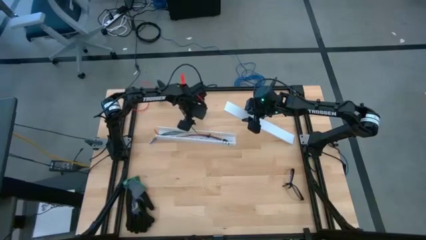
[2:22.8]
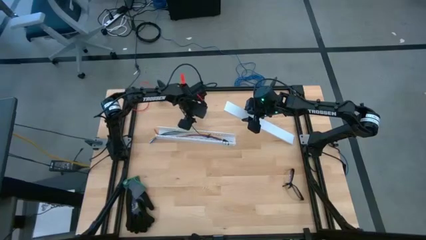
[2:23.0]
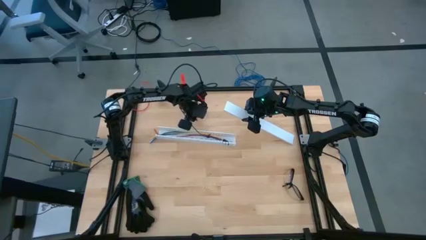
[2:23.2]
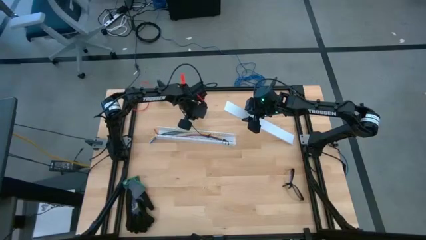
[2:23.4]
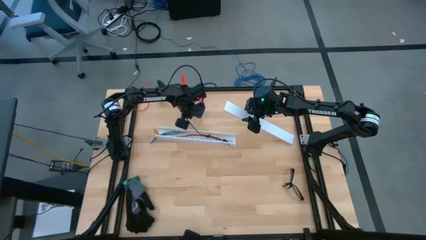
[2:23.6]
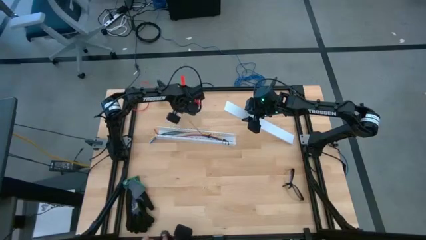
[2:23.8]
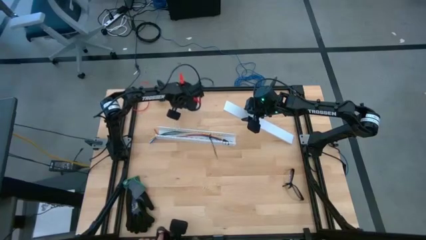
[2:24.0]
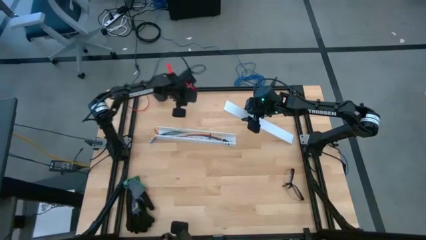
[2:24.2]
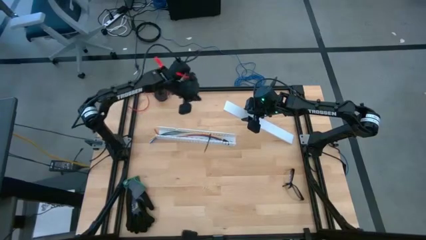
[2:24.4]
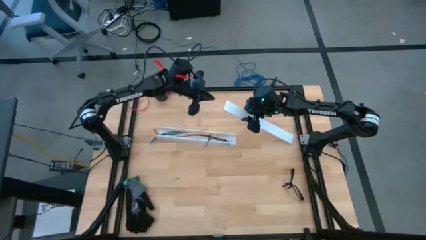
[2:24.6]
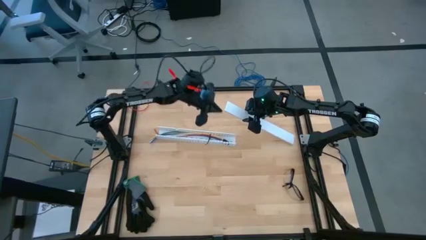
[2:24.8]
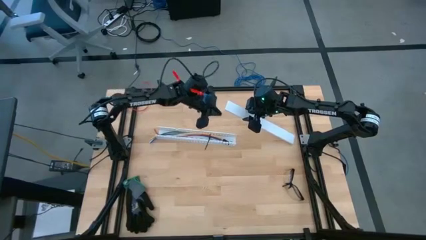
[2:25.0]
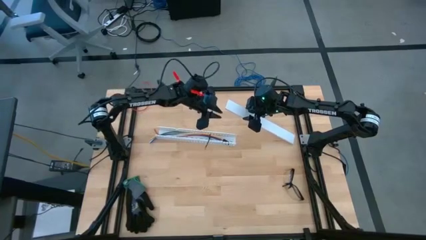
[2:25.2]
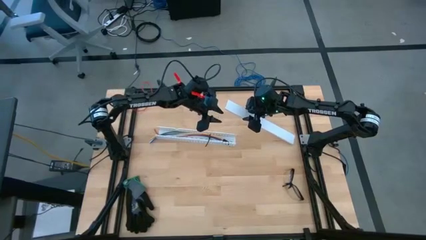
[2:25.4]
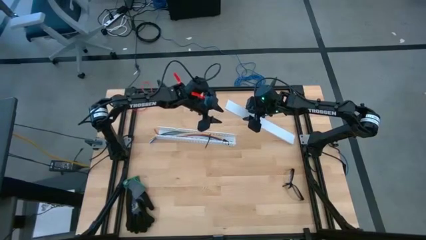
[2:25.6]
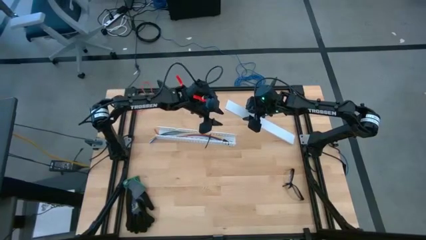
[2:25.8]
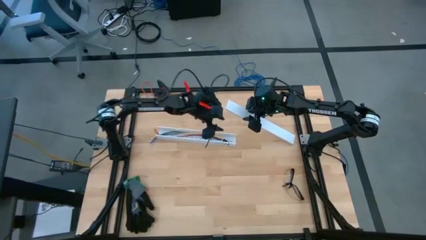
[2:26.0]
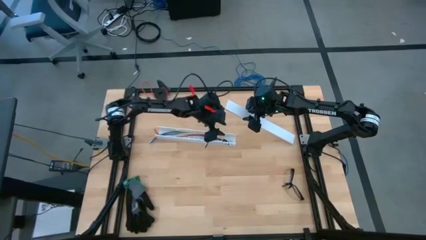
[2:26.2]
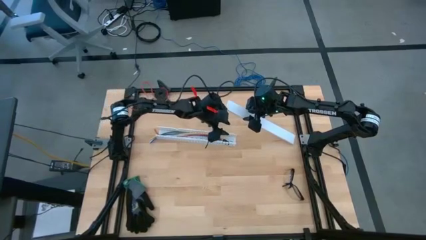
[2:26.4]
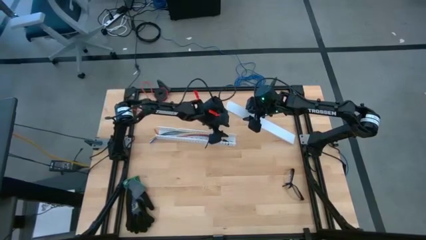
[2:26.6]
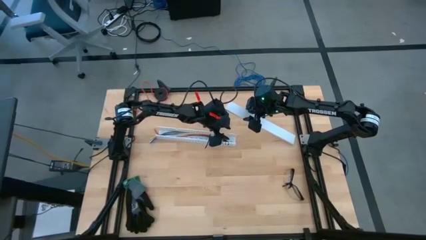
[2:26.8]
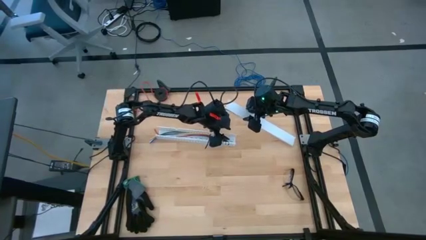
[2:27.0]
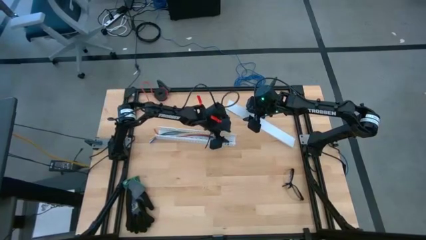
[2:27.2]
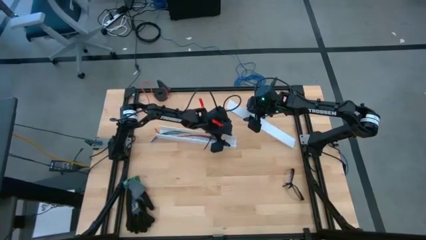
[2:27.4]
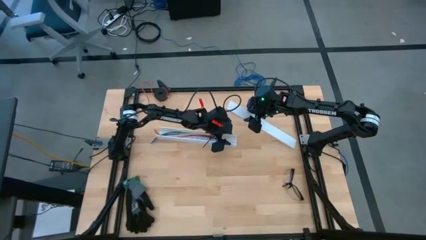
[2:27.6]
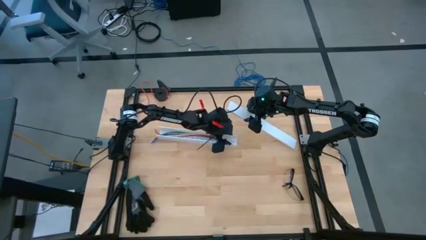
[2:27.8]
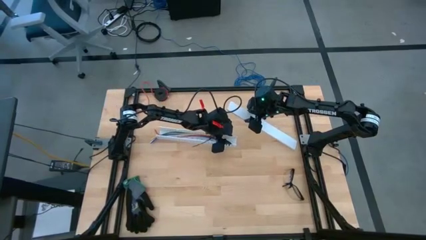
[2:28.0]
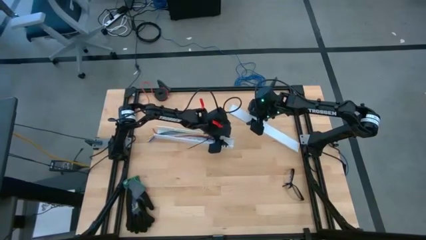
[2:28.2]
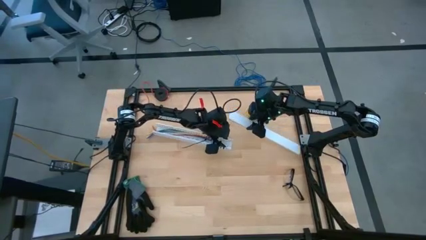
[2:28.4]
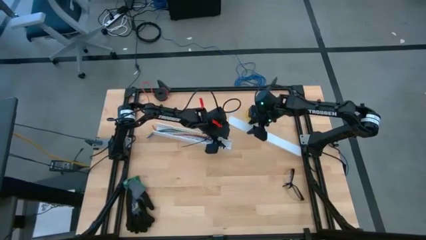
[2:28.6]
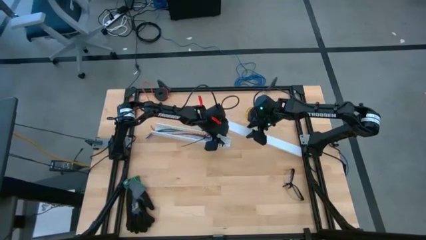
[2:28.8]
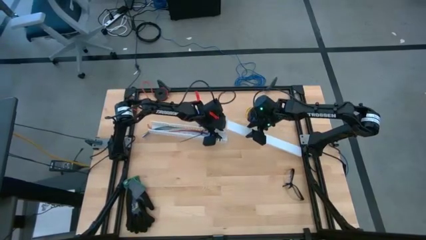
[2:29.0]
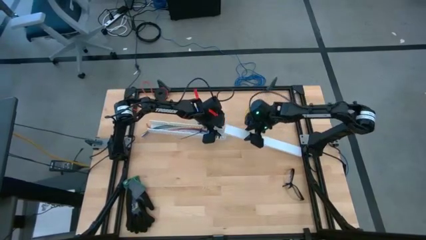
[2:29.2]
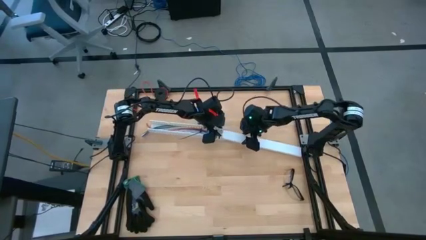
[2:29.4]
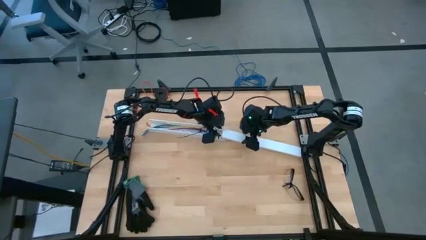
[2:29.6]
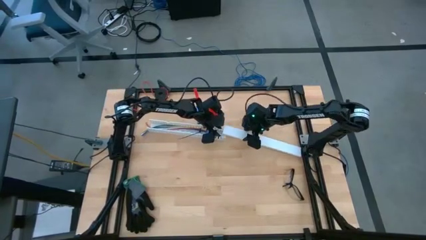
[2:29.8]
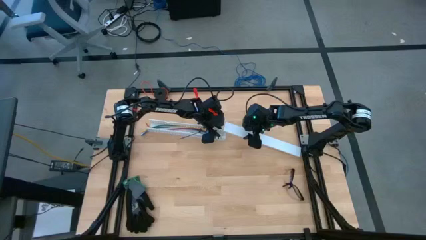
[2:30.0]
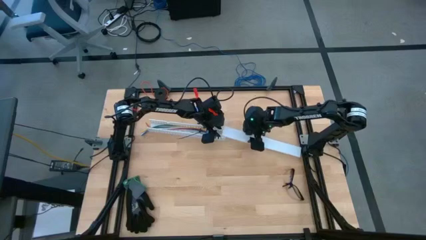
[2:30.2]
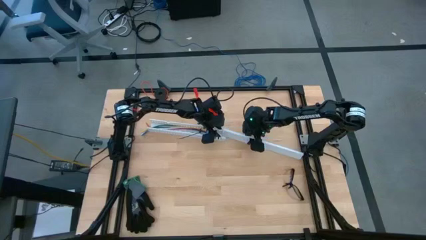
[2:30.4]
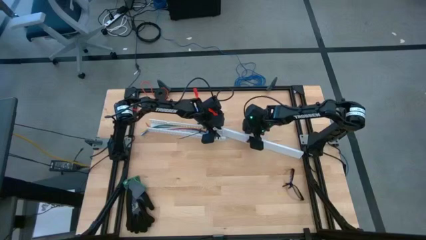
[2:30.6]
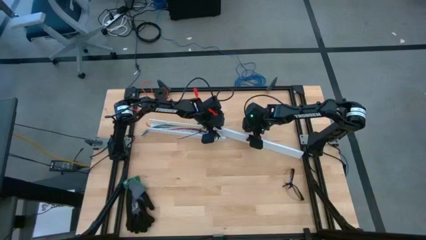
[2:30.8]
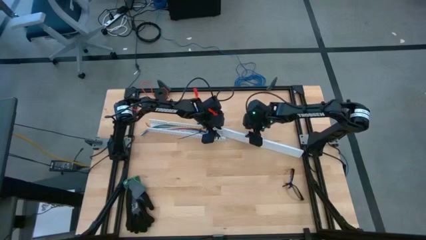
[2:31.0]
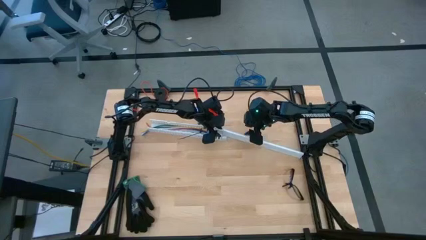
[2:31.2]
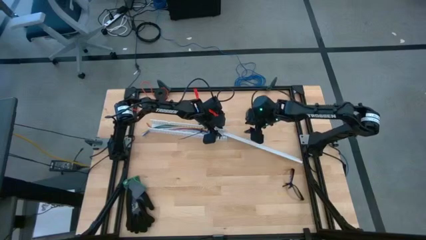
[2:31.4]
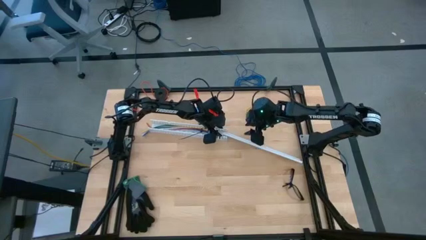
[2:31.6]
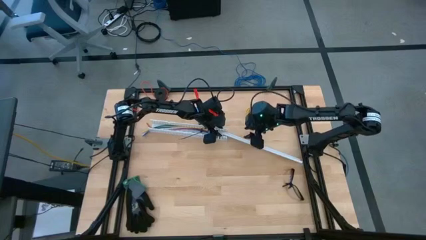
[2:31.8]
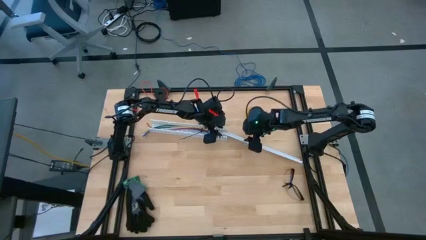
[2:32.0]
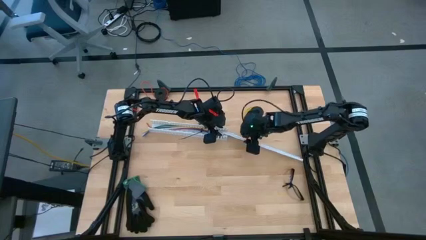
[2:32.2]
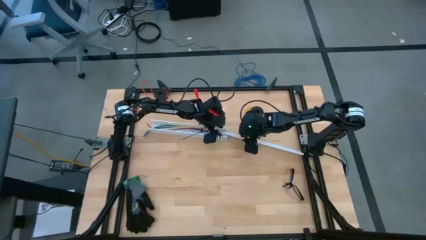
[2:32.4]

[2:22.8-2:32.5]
Task: Ziptie cables
Close the white cable duct

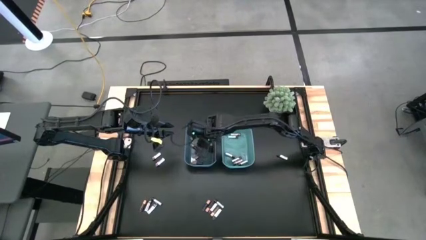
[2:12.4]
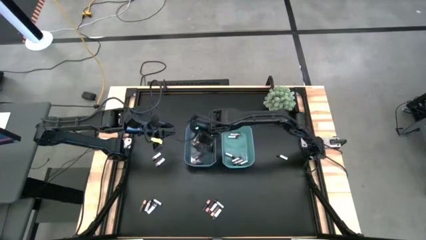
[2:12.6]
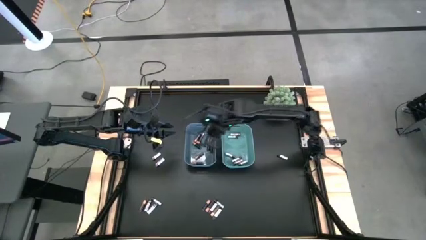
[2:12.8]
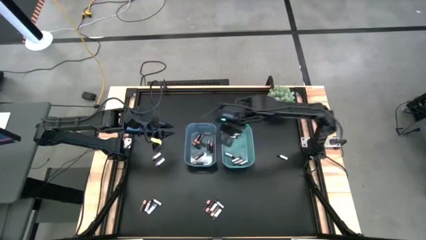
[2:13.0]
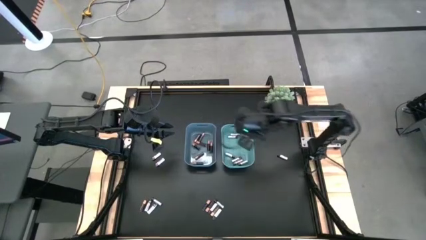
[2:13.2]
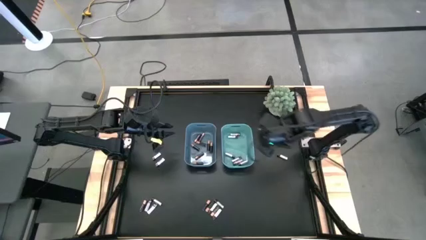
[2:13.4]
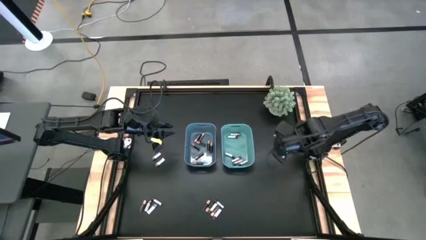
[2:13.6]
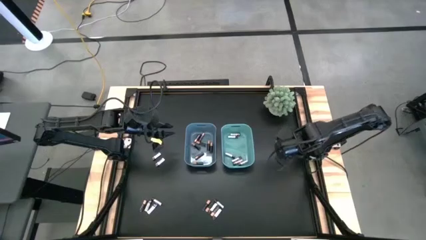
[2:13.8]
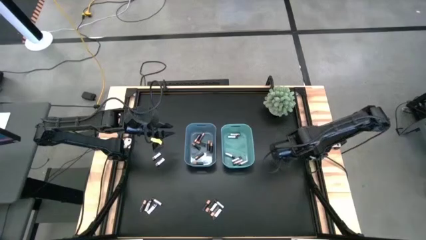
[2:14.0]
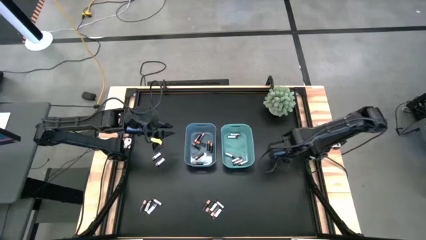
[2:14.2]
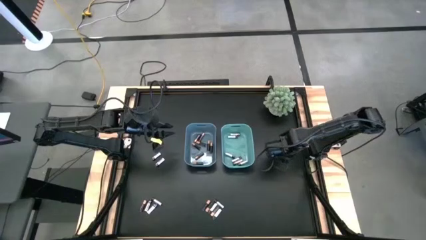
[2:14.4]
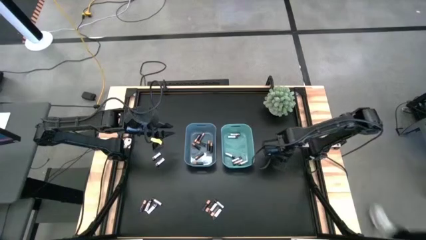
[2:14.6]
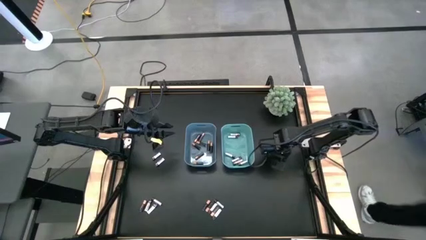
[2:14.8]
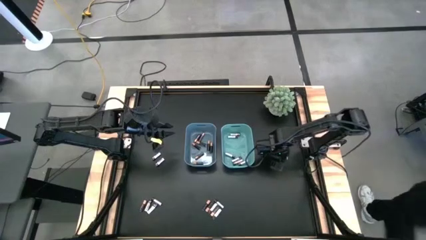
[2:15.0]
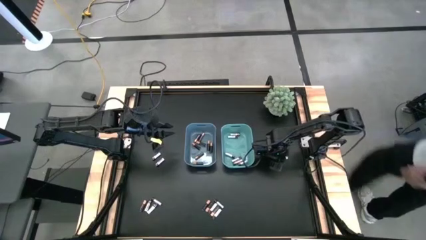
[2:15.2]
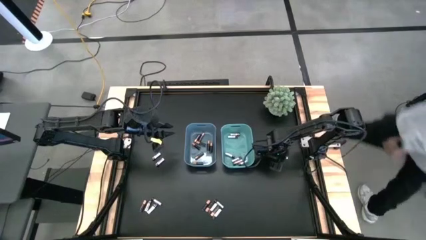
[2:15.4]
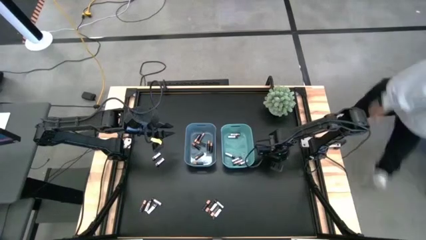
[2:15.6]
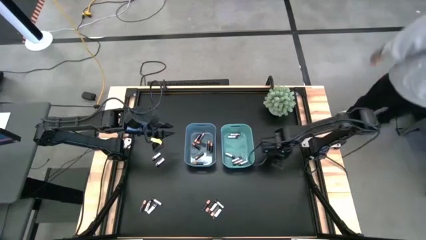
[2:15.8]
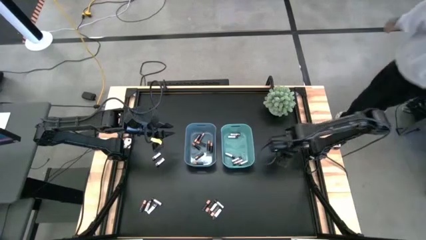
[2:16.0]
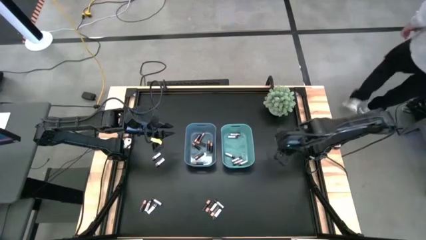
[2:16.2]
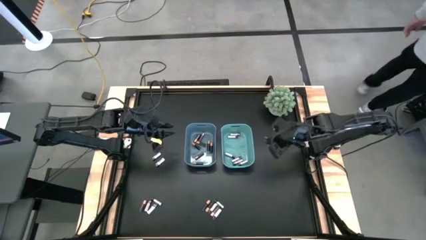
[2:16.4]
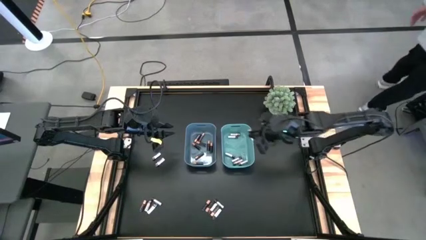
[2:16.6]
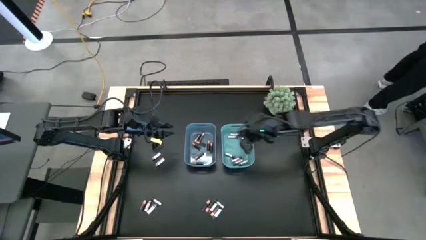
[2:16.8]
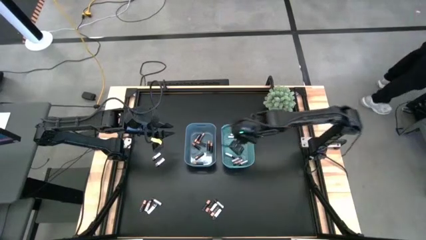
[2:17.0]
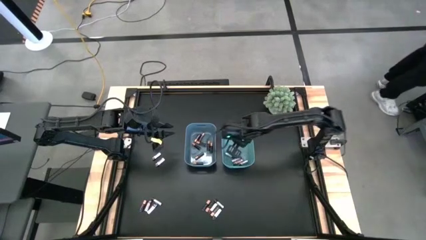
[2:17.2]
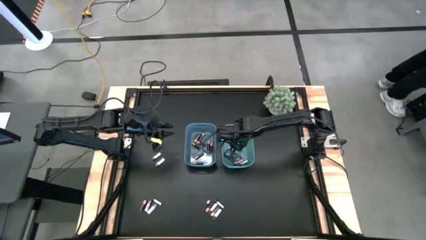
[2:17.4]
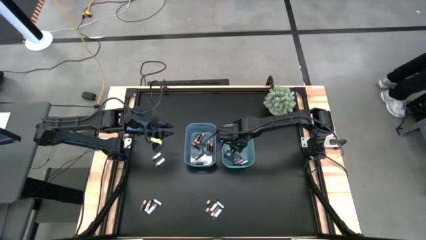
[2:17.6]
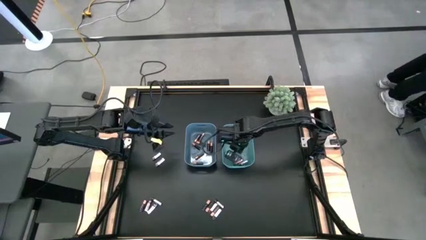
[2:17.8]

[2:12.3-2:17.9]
Task: Sort batteries
Put the white battery into the green bin
